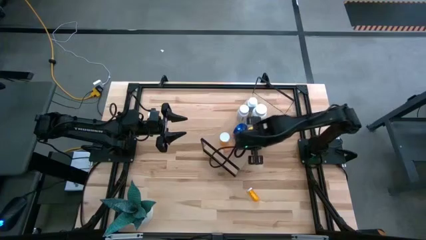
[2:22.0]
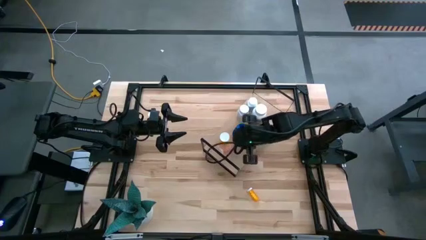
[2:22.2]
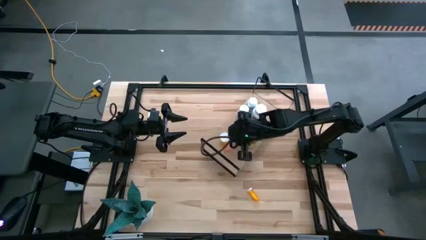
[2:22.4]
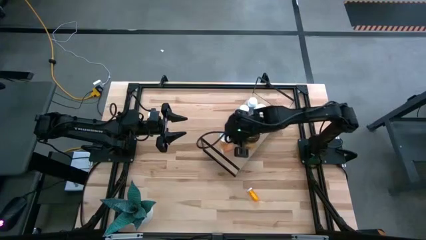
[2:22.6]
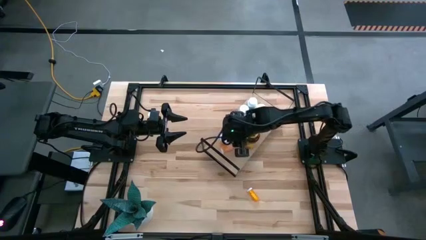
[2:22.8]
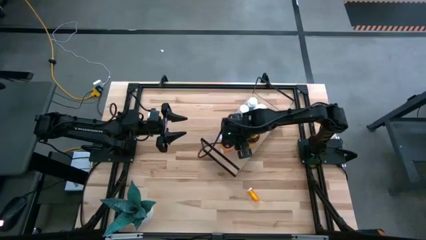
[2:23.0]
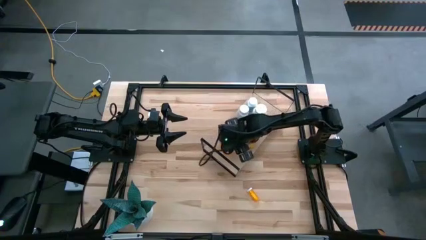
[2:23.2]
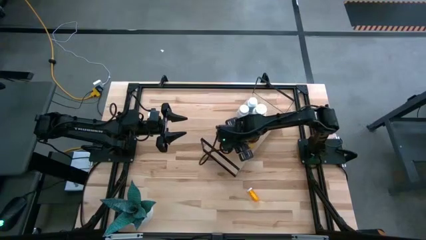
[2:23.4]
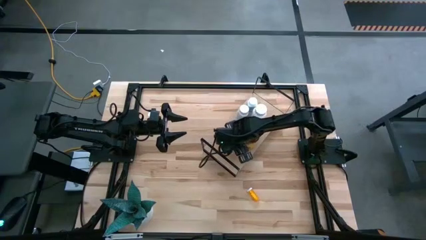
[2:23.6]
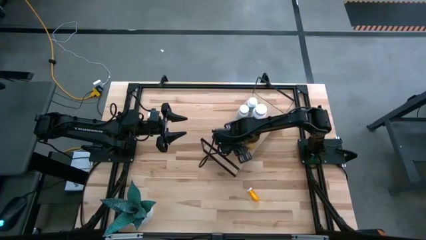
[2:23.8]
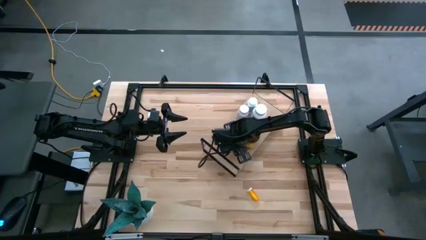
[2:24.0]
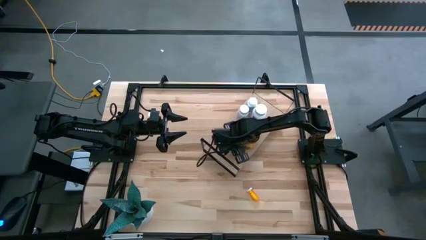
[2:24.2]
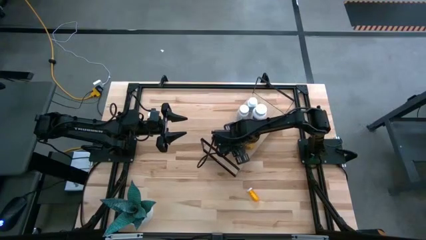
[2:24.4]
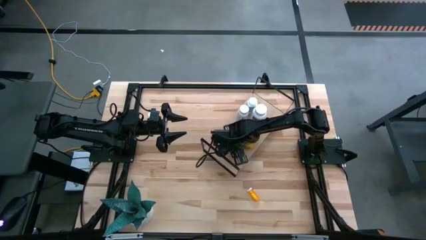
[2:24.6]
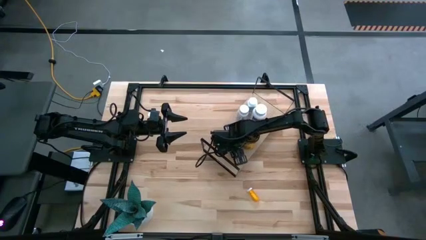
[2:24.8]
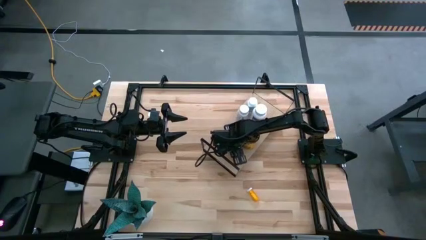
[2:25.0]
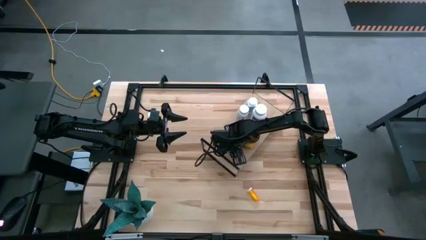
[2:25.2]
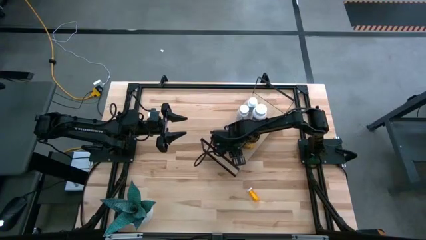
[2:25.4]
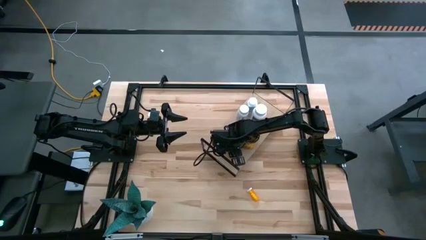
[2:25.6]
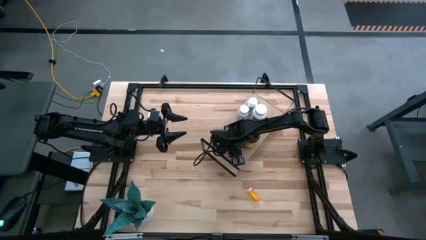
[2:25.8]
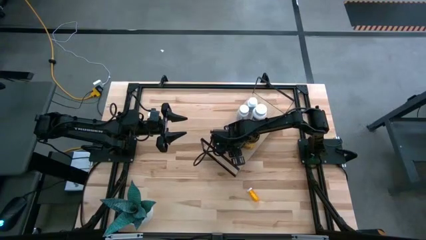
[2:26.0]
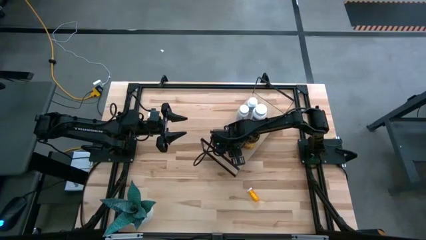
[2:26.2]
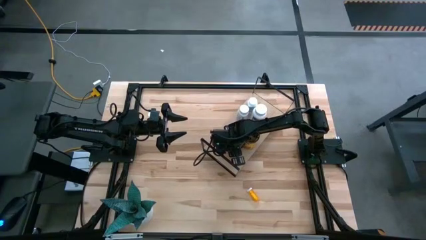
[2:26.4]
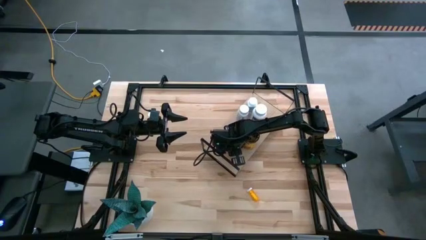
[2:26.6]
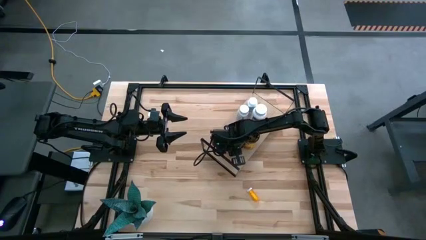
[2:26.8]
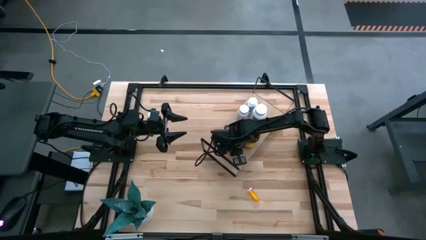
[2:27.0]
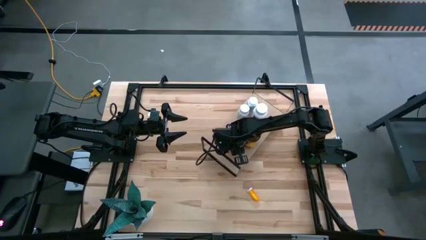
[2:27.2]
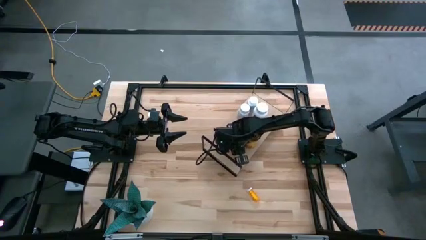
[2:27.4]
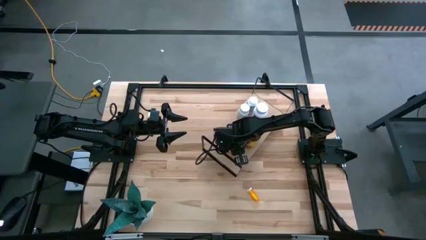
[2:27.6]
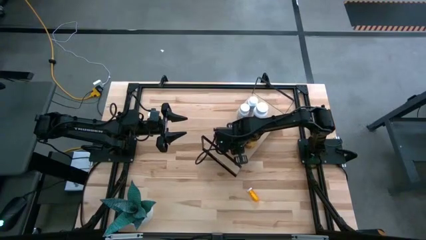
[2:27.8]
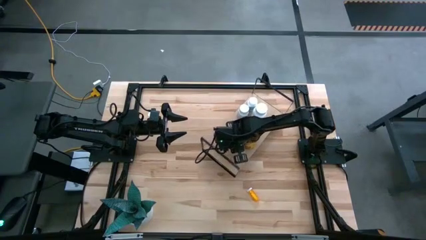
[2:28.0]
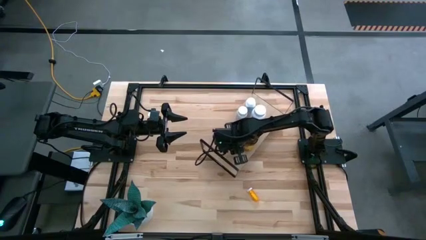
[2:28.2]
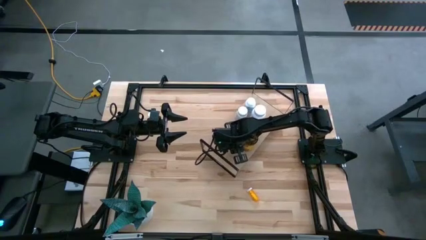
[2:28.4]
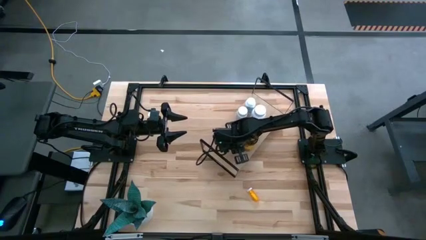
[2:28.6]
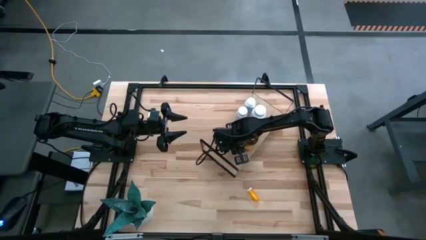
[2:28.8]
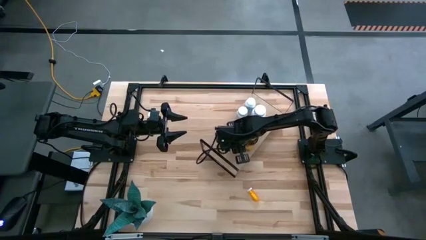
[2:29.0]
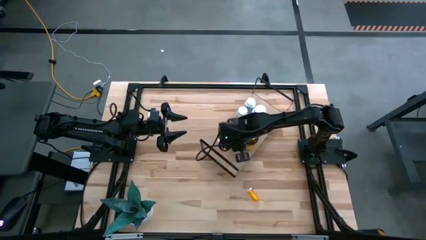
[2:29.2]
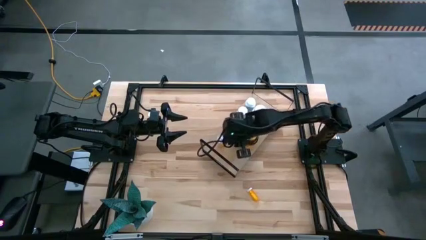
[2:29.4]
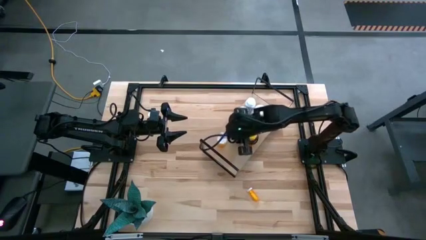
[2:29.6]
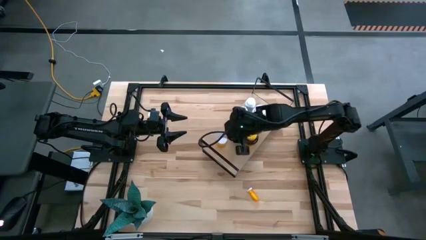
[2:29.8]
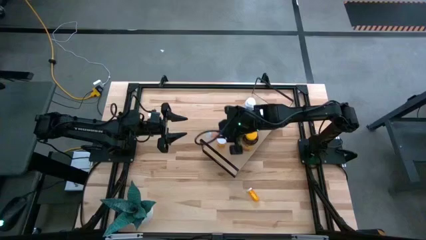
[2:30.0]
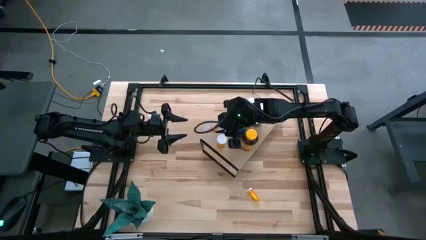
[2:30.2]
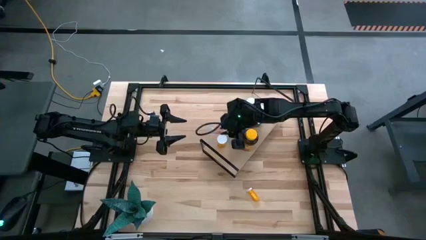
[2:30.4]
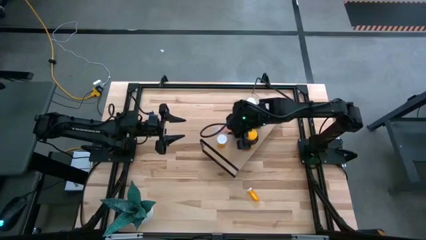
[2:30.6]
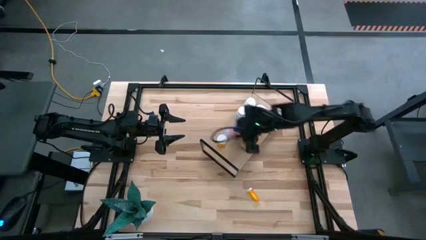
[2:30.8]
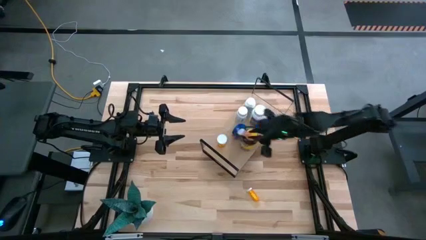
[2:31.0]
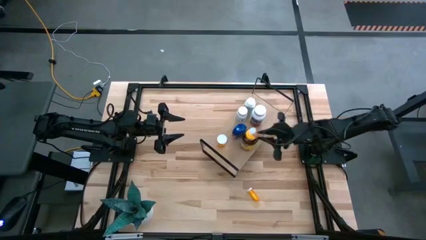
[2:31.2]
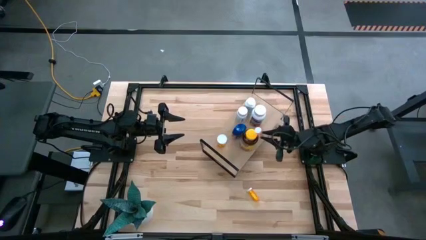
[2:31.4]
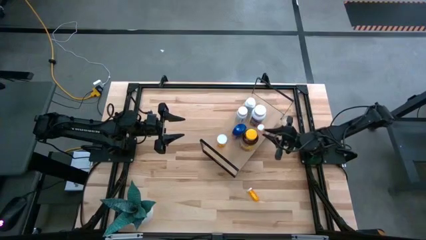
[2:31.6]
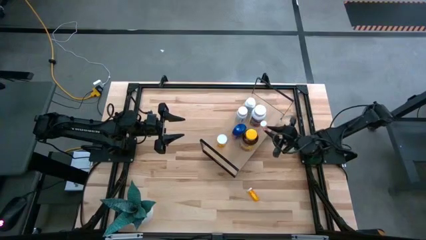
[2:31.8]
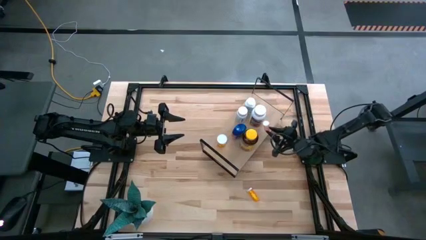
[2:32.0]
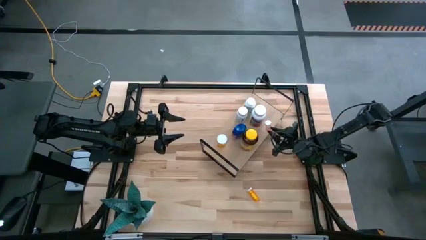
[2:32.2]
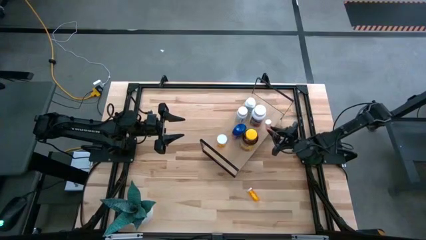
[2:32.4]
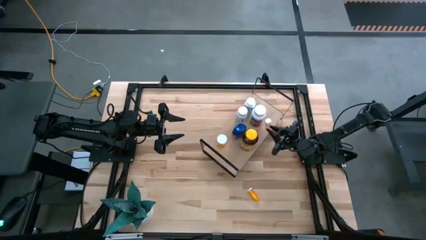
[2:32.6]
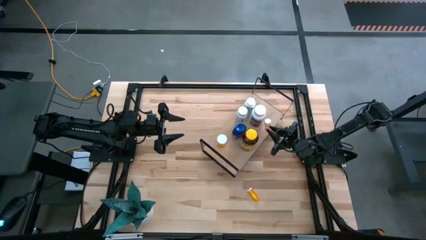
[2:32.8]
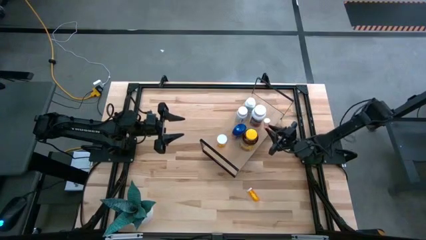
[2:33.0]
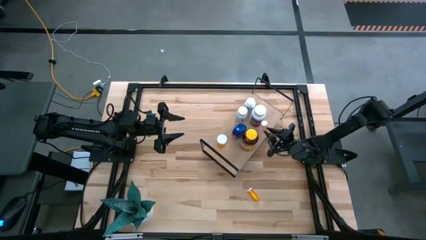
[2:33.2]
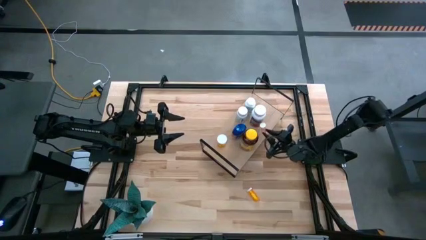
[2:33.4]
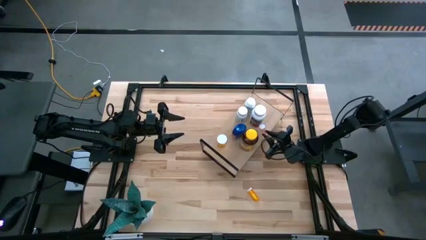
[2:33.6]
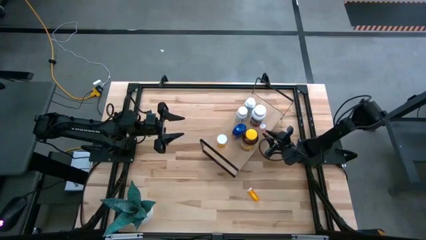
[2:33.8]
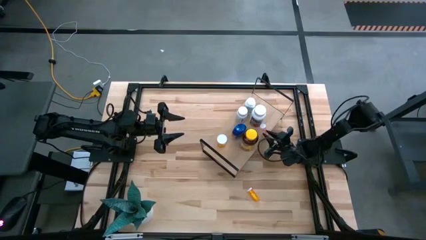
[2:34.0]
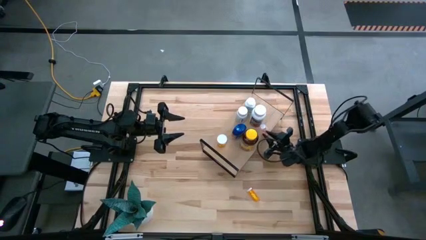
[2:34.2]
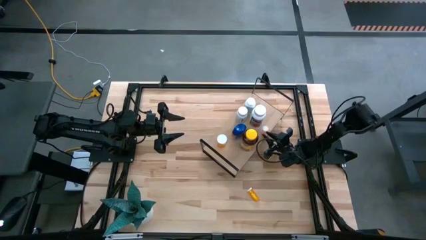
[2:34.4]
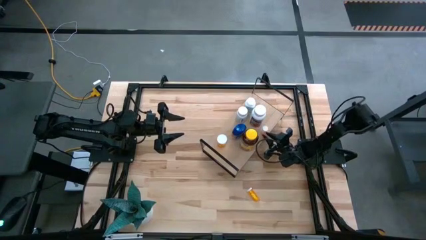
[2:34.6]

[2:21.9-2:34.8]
Task: Pick and place medicine bottles onto shelf by color
Move the red pill bottle to the bottom center of the shelf

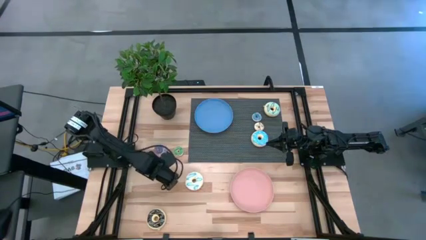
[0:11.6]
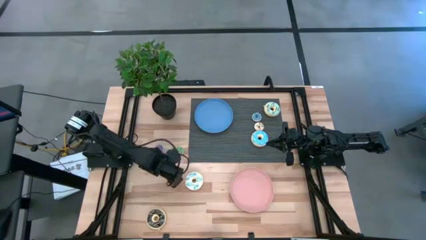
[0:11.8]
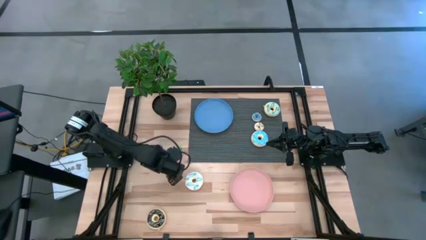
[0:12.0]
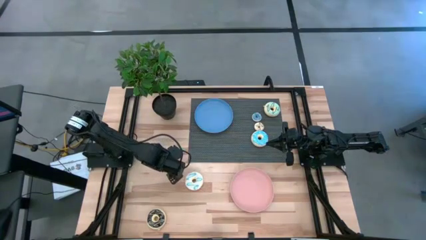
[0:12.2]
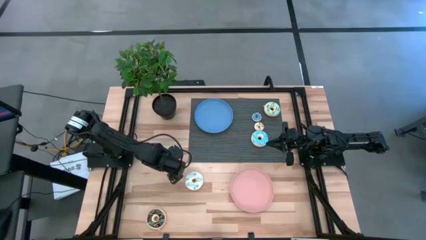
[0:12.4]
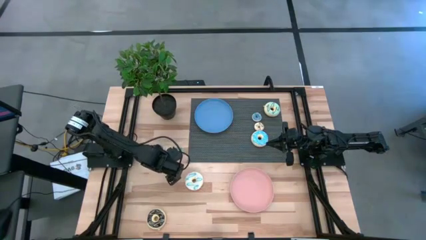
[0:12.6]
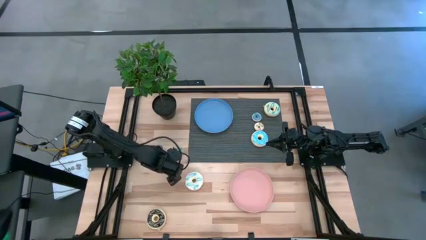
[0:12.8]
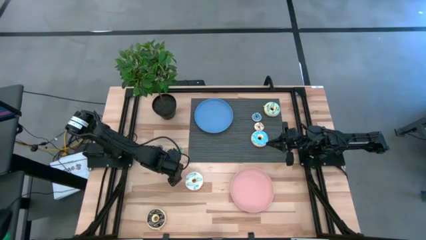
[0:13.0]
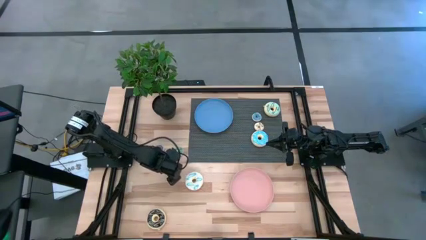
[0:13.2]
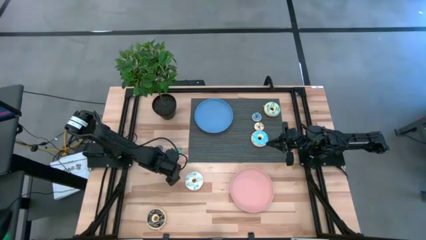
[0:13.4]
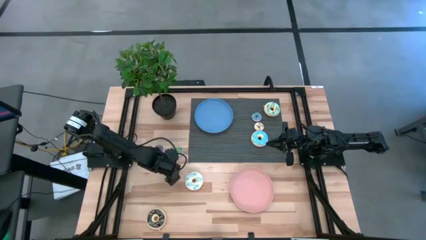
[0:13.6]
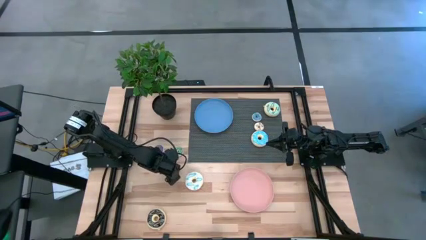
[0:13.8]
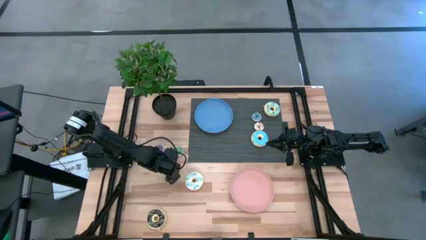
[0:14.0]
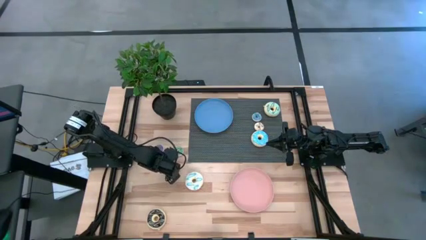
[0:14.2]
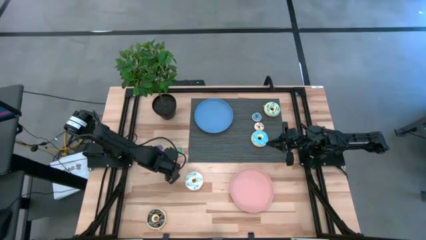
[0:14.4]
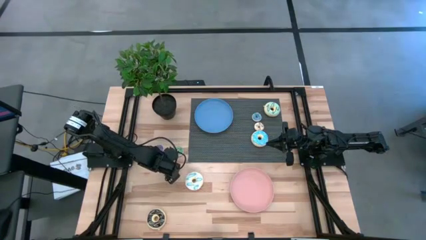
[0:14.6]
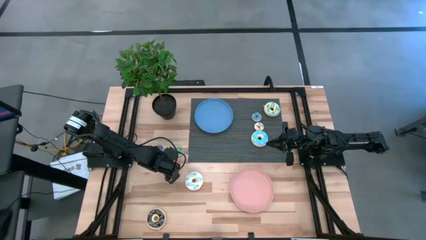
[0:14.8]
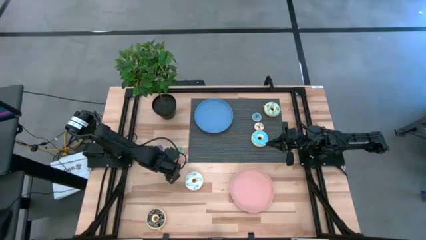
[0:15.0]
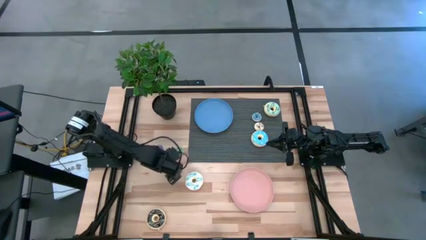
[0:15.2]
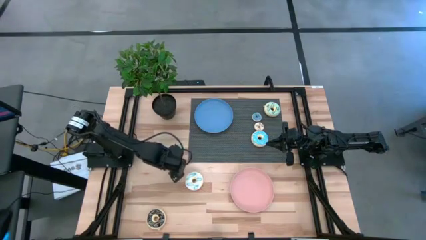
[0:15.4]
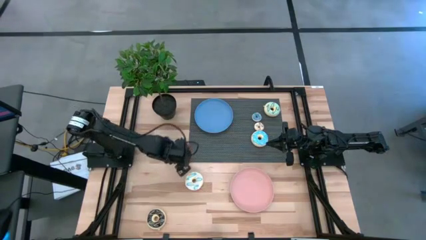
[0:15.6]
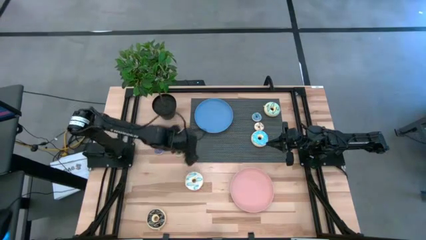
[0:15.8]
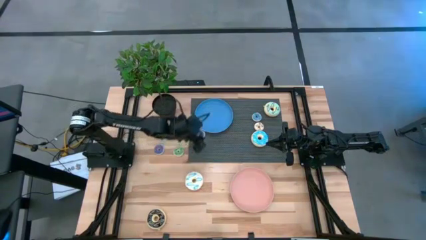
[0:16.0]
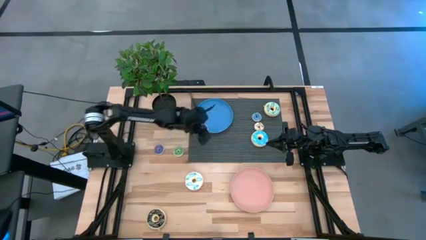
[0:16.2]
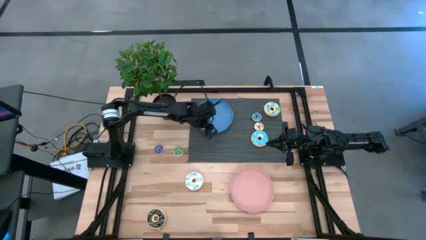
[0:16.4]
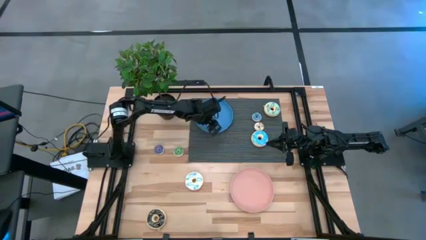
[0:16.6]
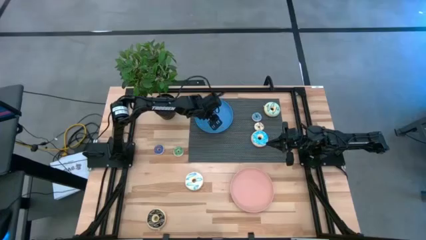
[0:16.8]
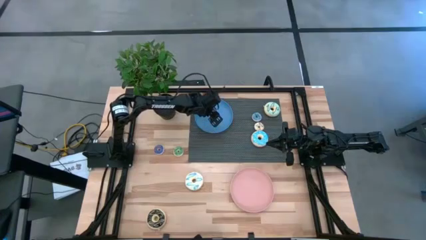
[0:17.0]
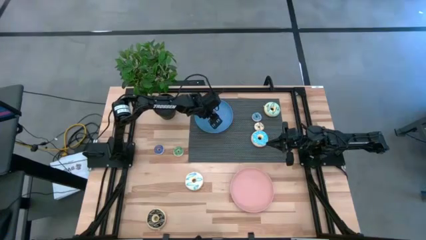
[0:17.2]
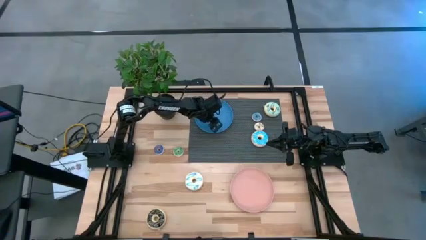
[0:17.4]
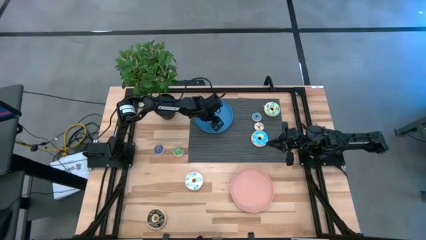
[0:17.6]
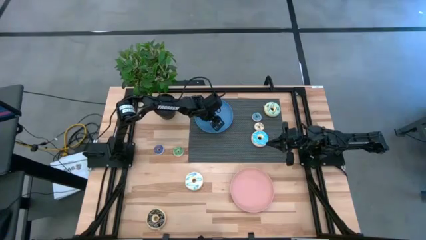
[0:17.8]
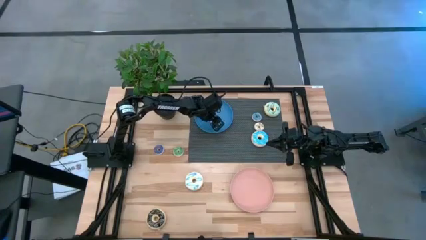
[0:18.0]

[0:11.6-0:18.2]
Task: Pick & Place donuts
Put the small blue donut into the blue plate
